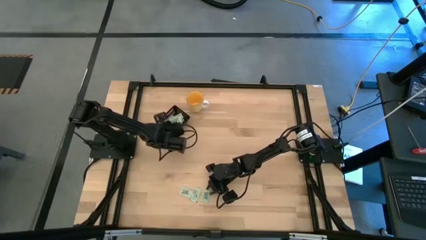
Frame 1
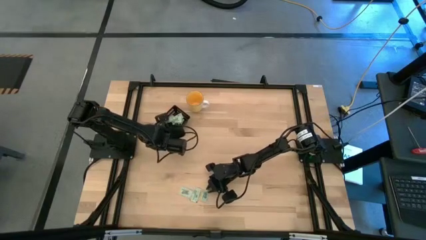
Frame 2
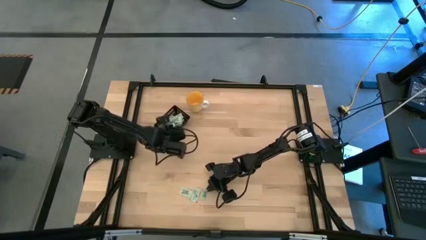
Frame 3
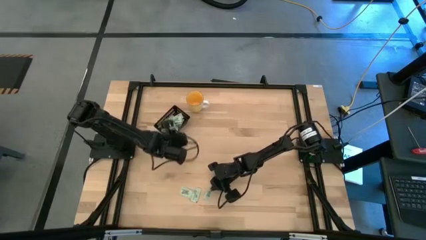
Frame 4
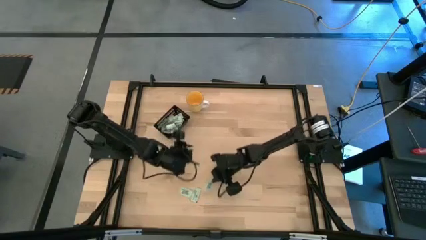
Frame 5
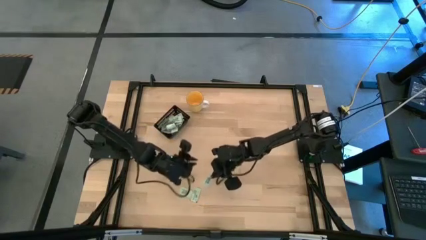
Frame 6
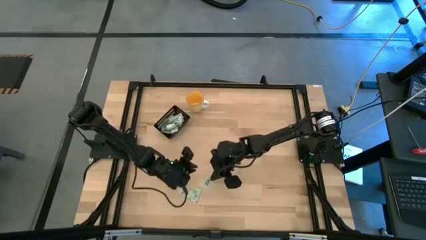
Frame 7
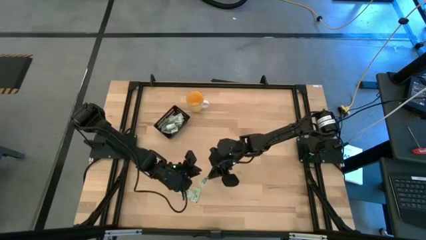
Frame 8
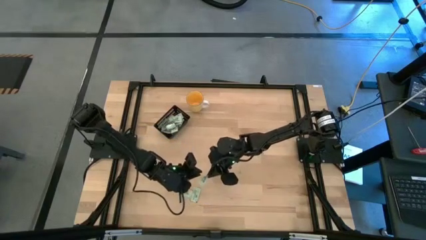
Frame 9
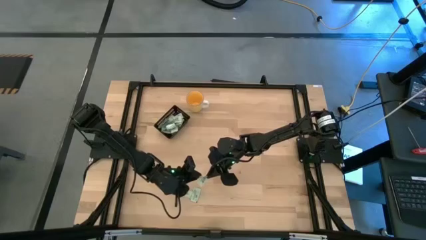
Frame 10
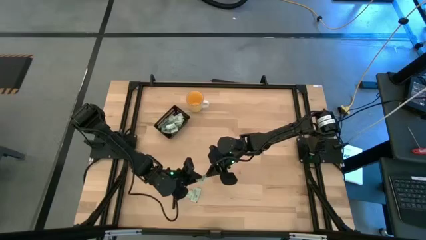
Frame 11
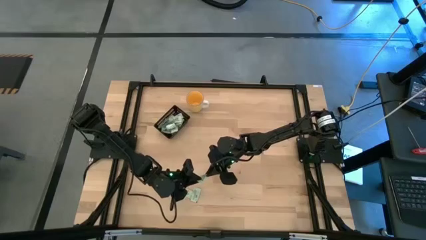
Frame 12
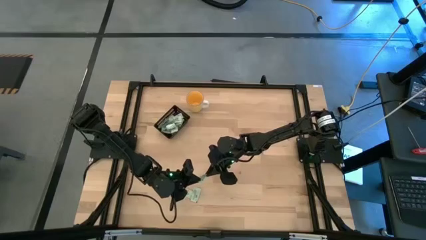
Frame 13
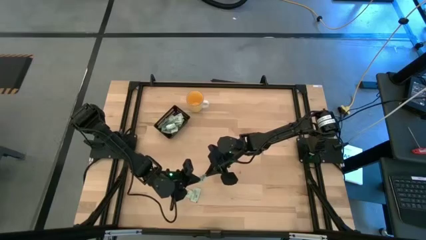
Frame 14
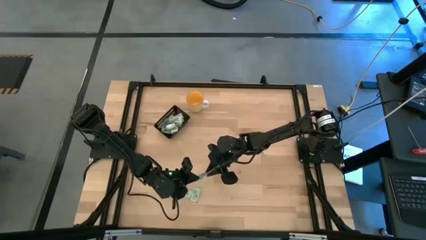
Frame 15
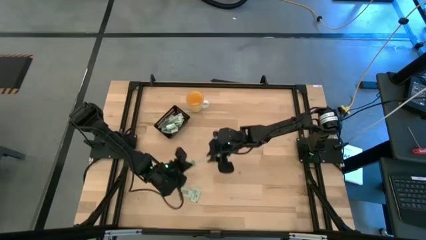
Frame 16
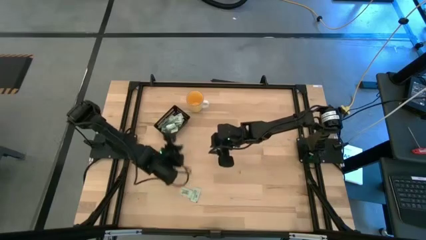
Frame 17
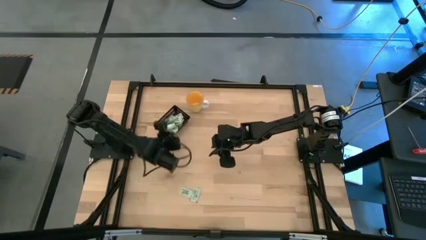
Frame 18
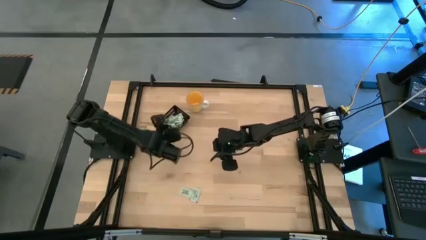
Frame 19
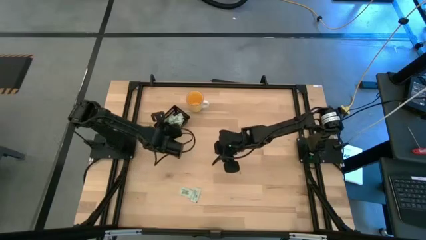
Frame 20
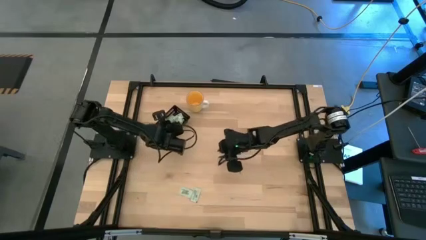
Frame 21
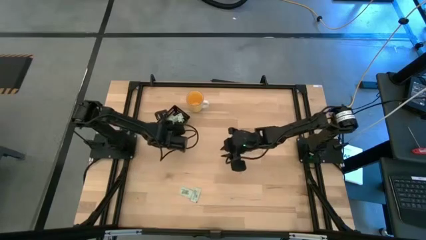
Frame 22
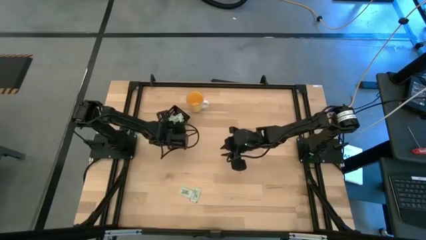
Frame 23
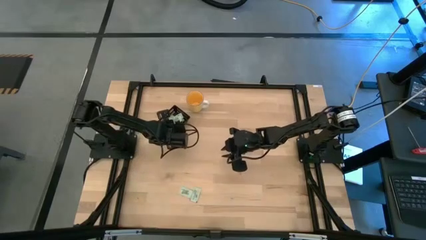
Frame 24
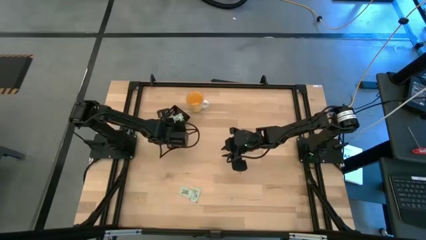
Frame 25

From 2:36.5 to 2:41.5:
Task: Pick and place Stevia / Truvia into bins
Put the green stevia packet into the black bin

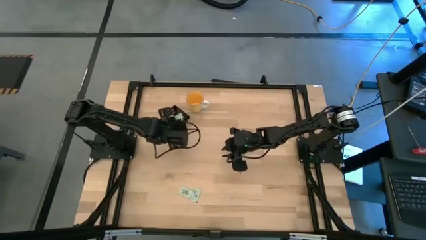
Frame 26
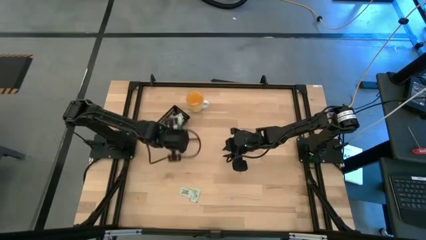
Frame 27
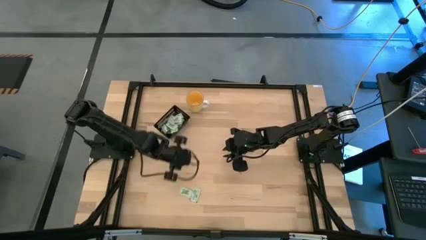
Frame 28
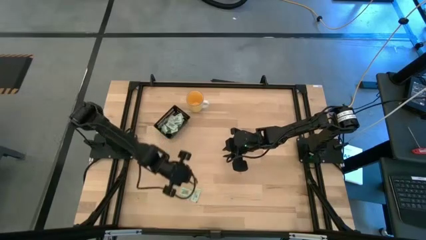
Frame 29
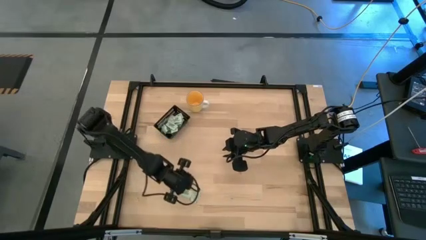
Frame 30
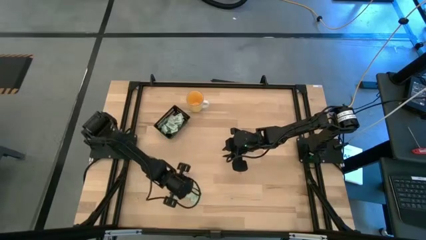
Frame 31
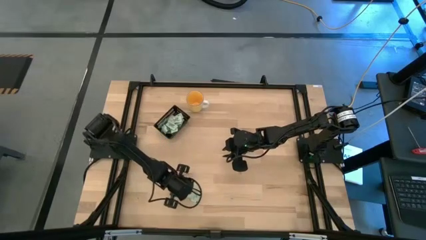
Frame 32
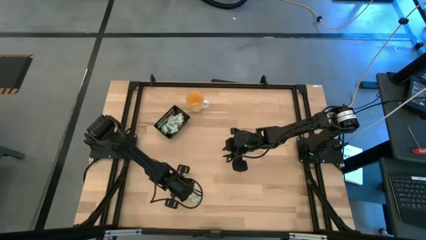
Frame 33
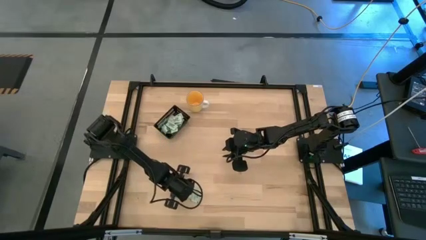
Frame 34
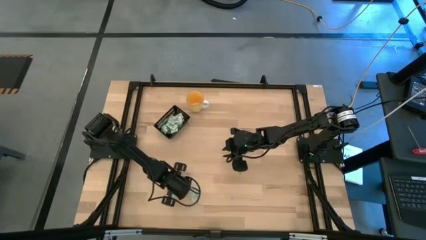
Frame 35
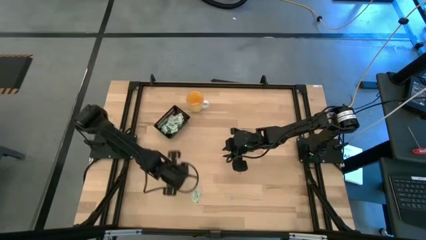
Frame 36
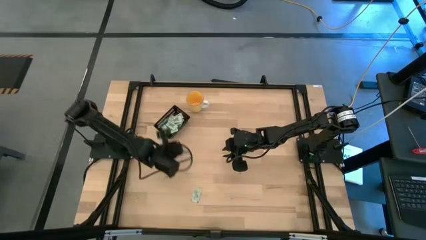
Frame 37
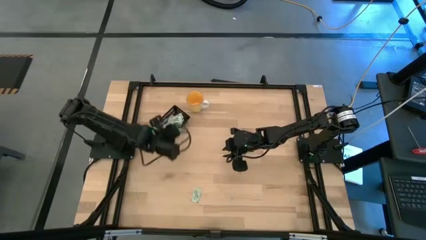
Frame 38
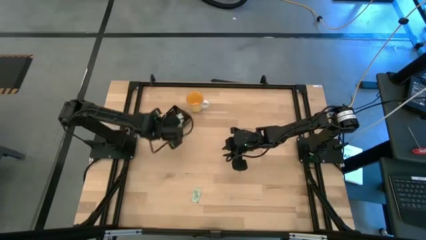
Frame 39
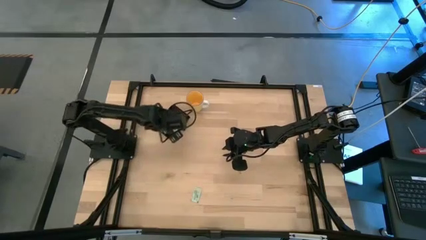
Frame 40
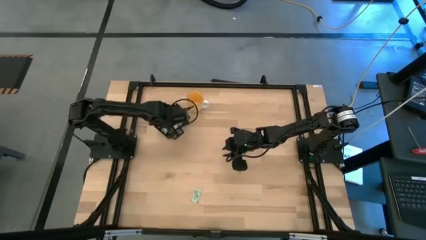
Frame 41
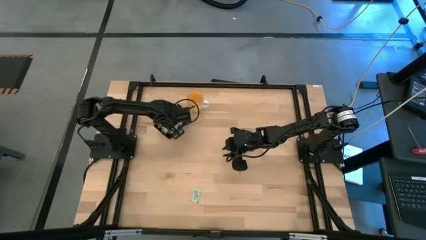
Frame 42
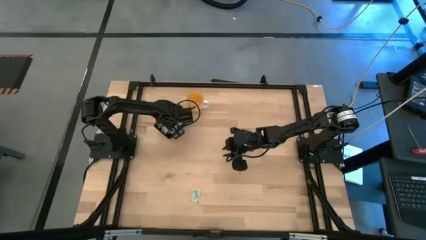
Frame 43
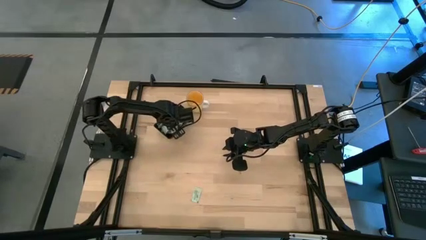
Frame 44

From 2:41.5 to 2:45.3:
Put the green stevia packet into the black bin

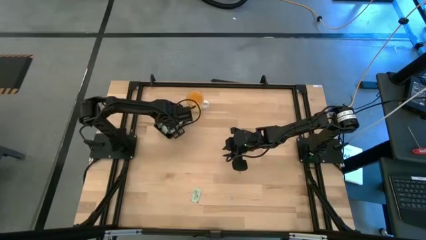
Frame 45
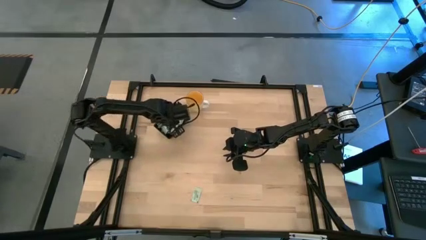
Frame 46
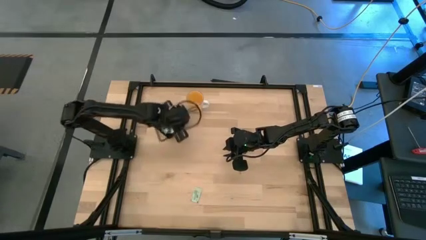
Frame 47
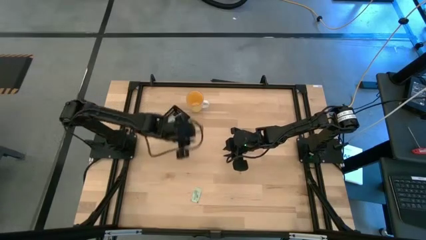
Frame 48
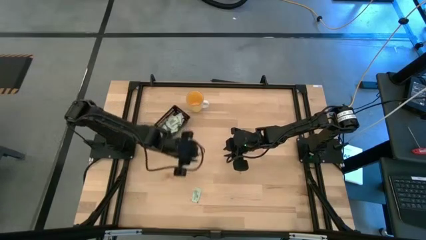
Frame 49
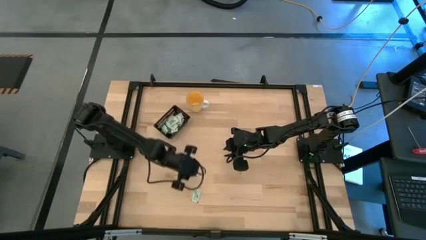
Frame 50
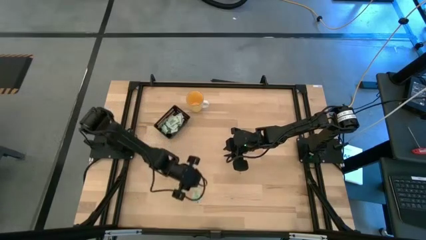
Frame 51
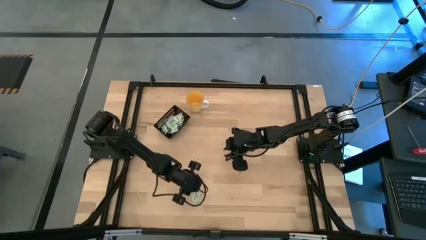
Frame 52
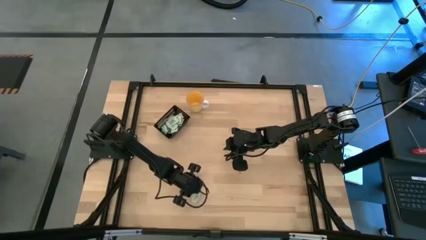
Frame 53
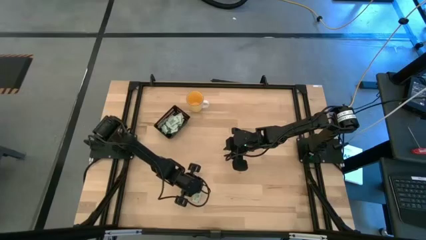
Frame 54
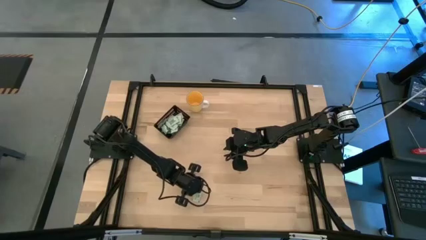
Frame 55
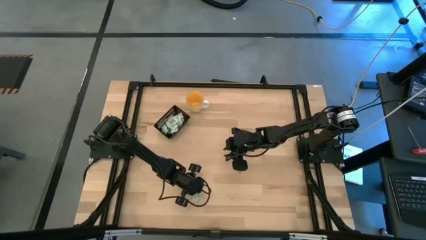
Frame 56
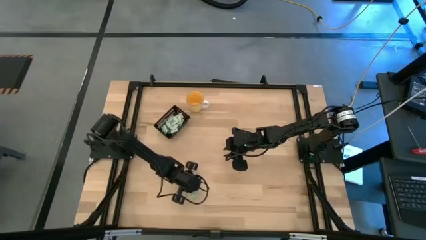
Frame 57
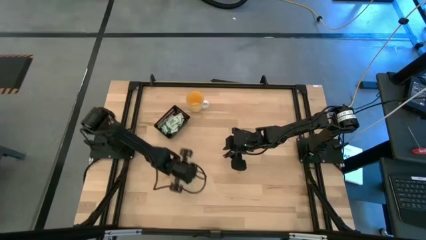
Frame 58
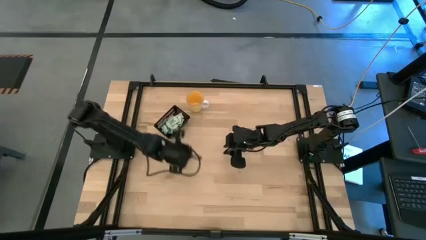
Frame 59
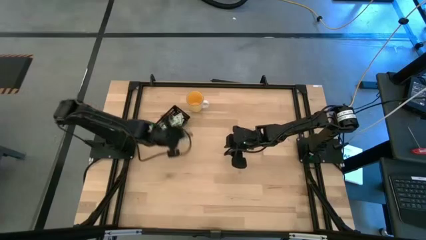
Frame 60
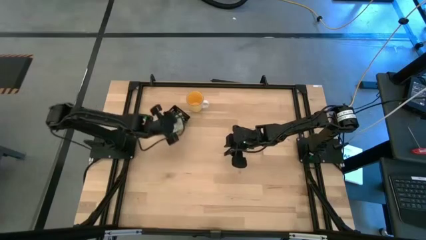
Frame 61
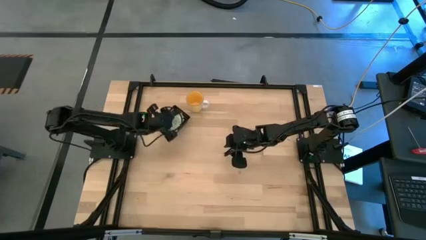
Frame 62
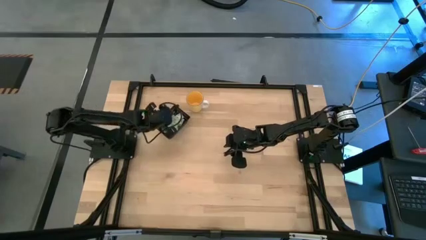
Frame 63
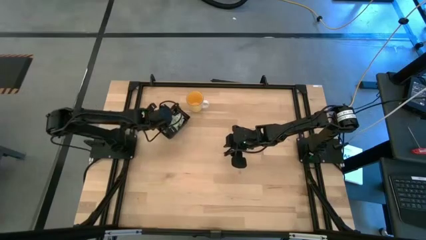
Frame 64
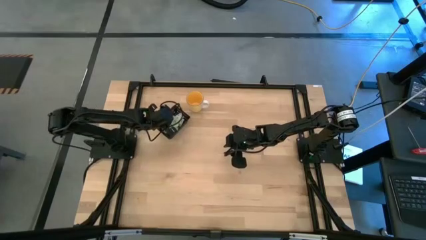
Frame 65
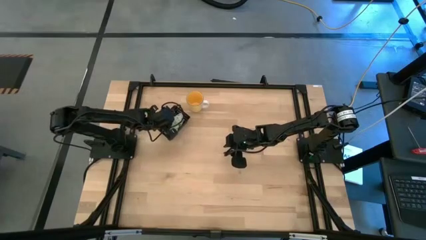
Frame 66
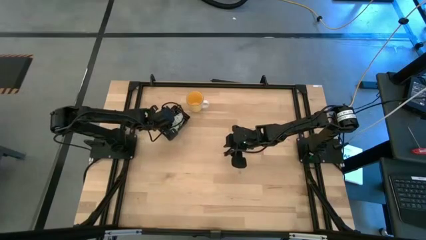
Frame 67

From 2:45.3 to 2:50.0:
Put the green stevia packet into the black bin

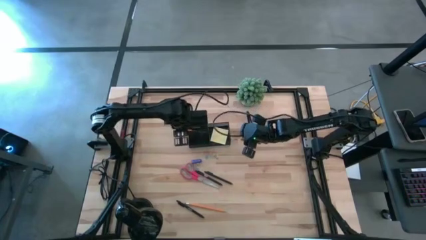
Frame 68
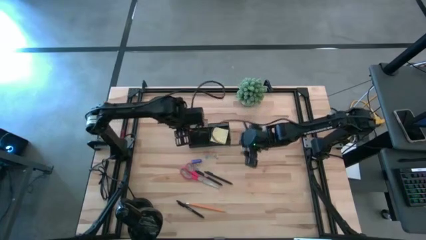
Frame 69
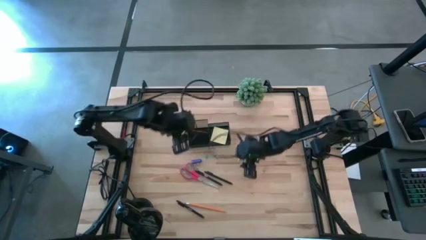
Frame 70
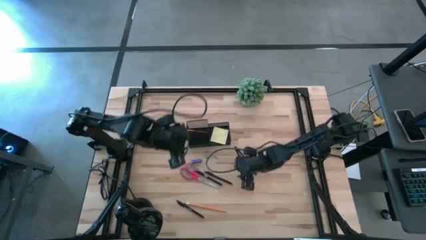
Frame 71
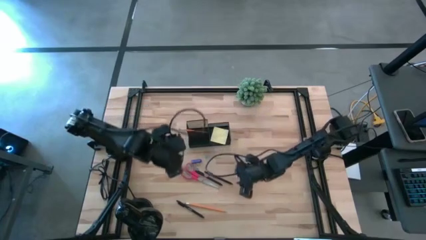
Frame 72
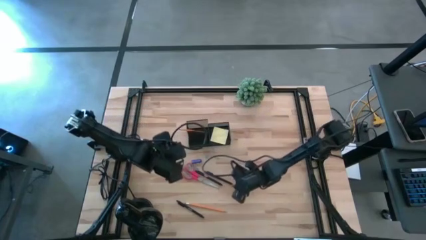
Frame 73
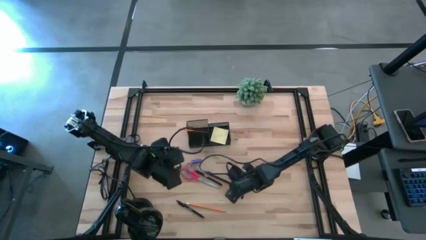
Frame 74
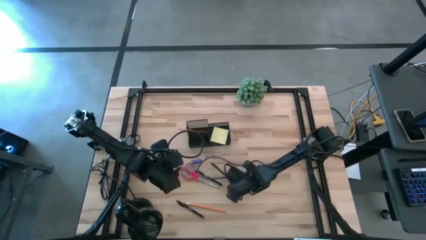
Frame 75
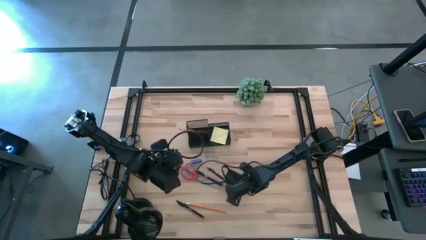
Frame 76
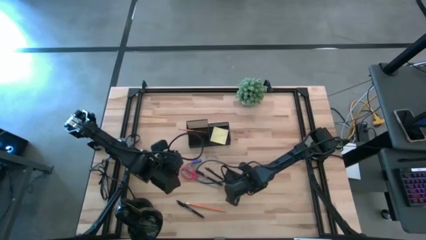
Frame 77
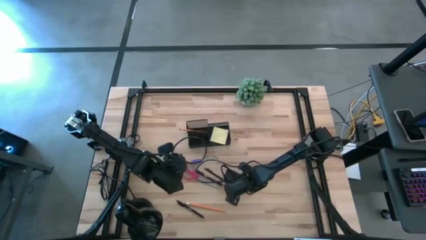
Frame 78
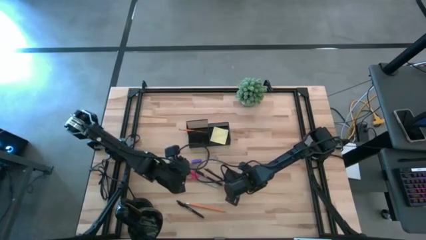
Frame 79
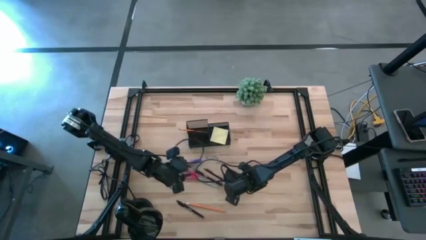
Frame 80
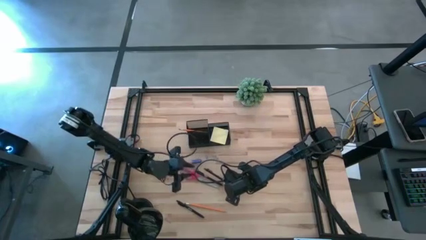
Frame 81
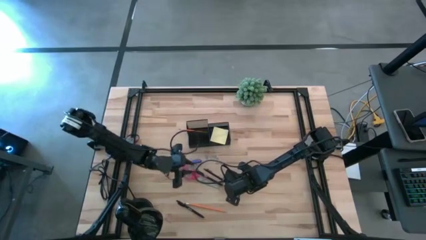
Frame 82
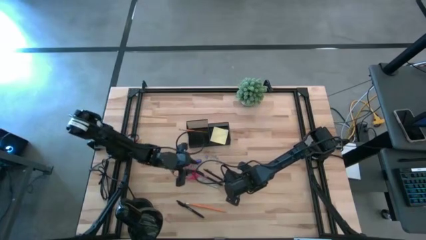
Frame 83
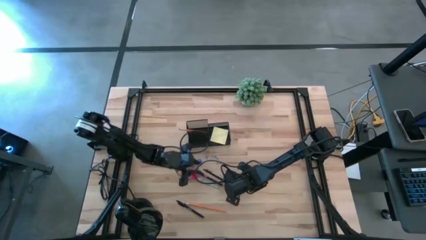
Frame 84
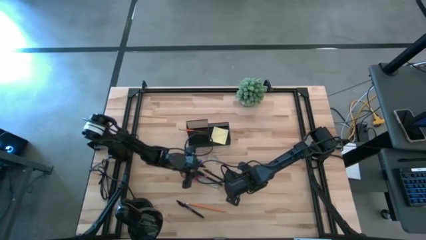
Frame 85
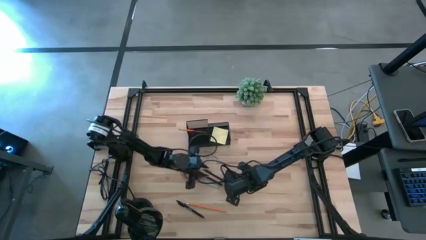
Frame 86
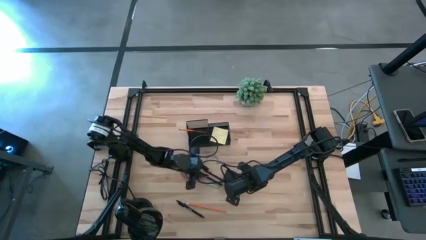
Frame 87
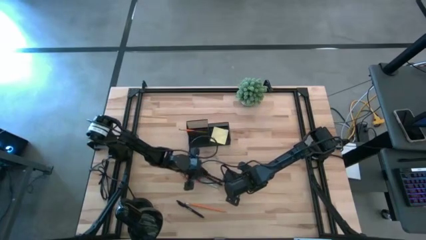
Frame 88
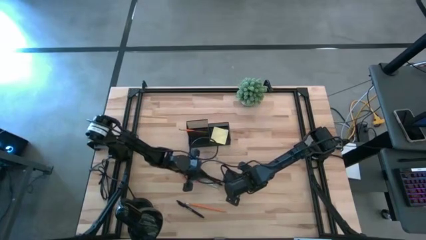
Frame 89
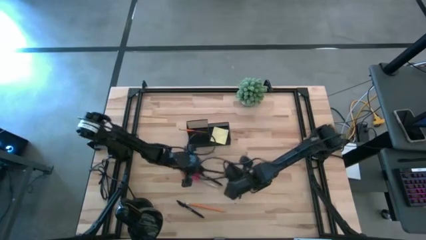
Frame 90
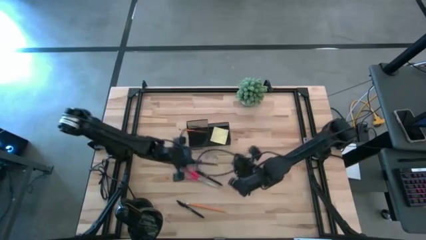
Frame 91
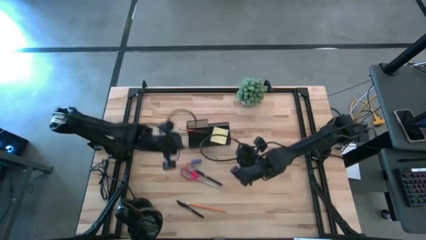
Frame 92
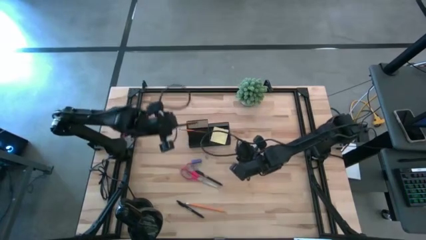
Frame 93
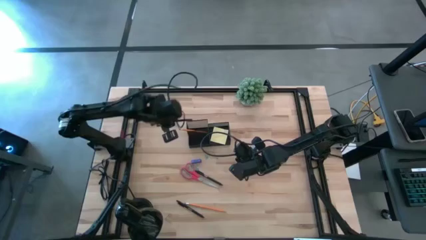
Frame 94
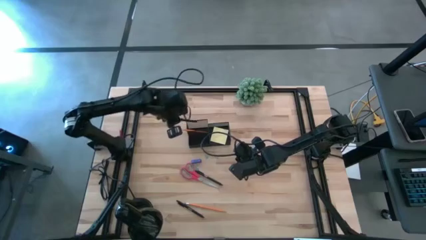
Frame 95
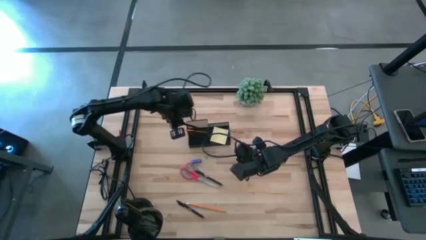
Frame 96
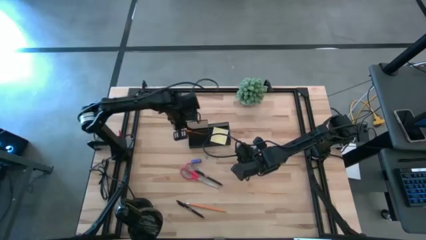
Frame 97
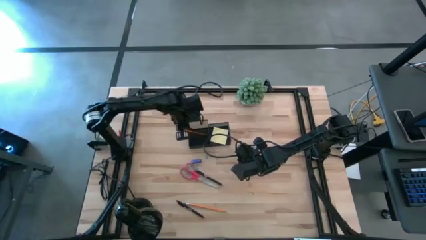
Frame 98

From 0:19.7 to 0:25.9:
Task: Pick and place office supplies into organizer
Put the top black pen into the desk organizer
